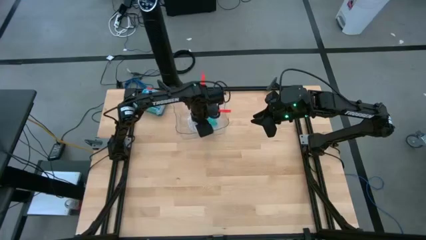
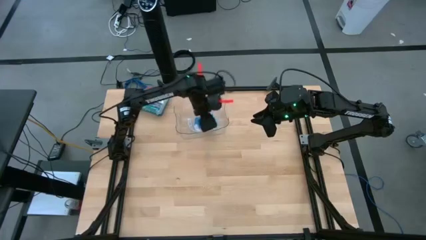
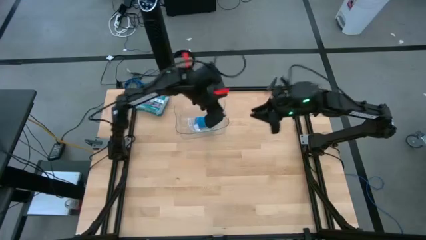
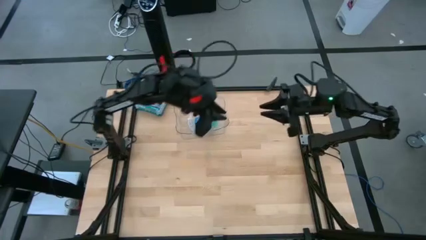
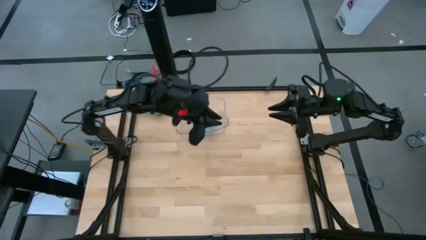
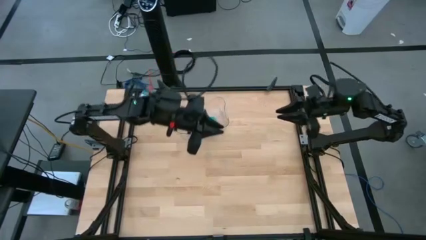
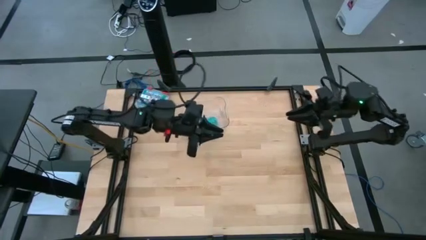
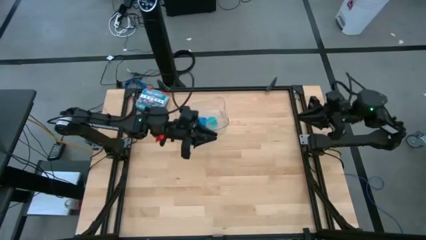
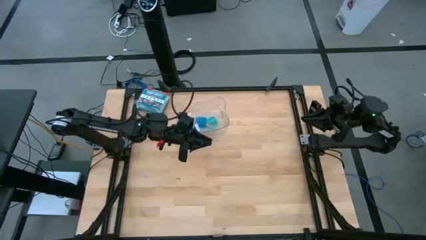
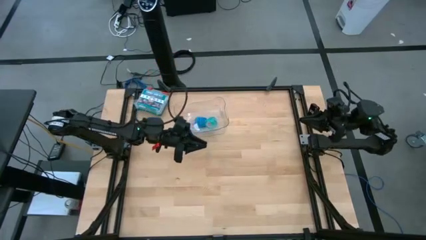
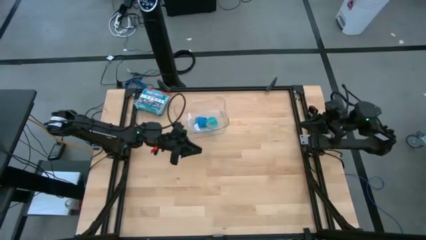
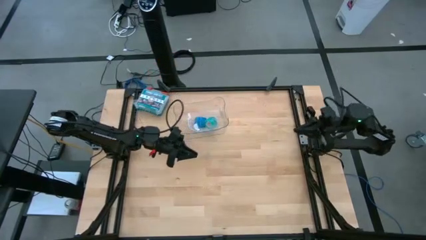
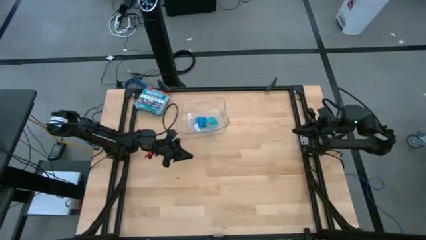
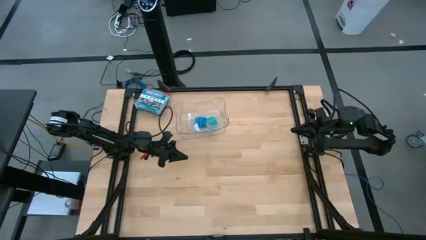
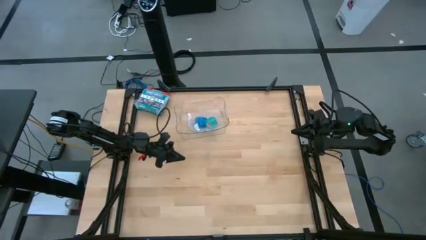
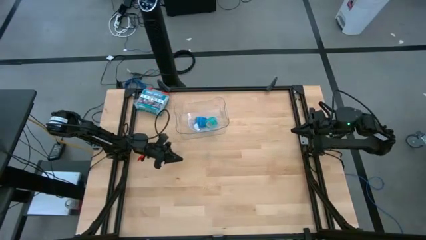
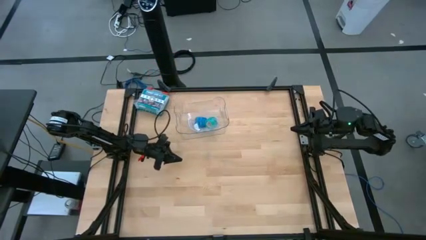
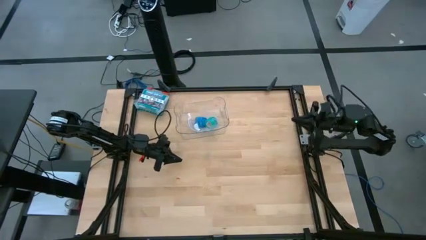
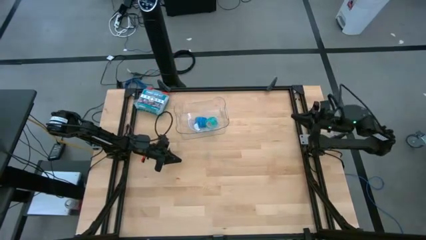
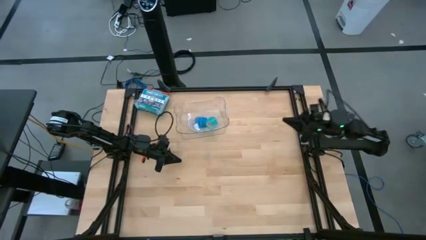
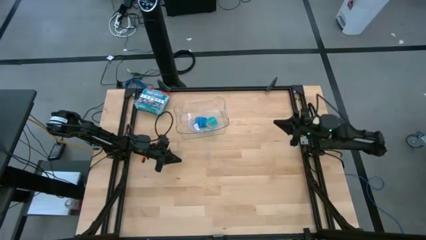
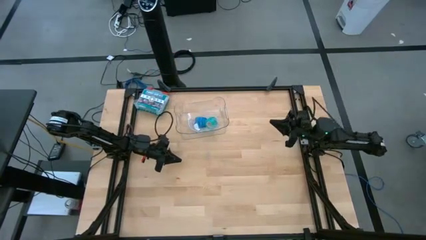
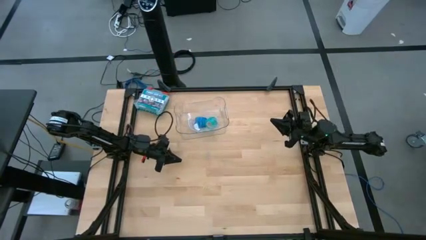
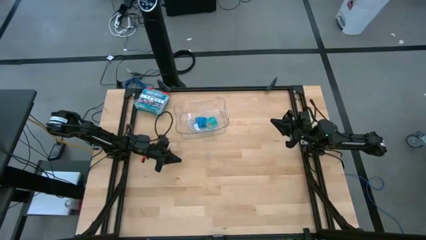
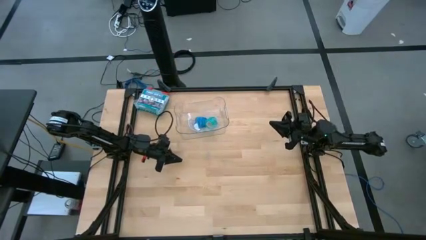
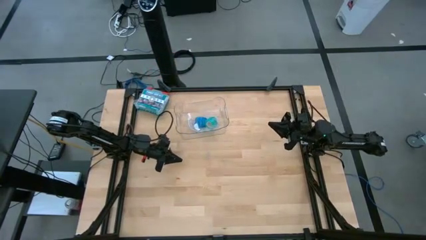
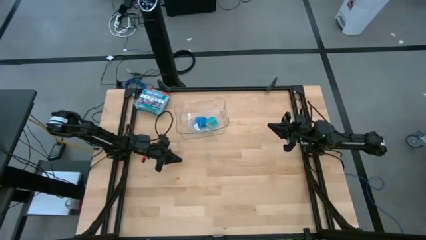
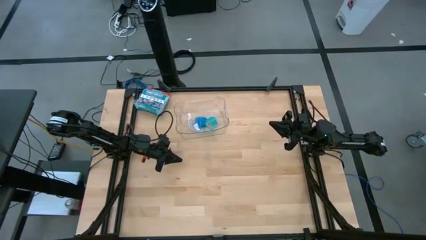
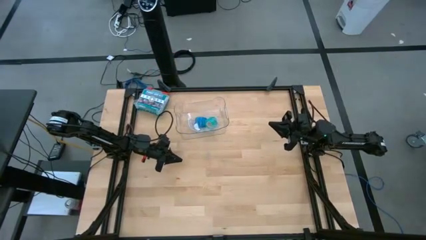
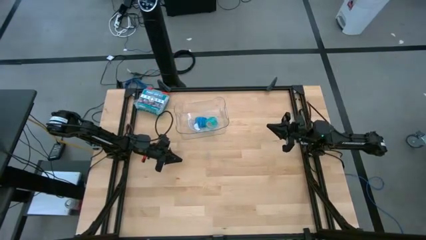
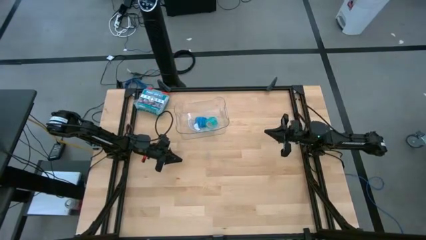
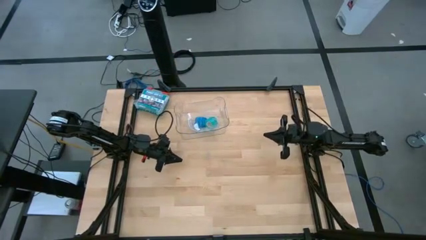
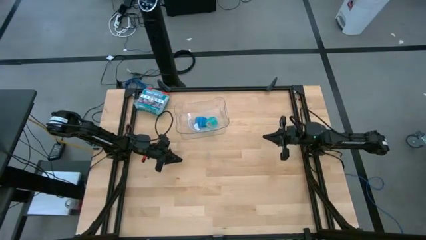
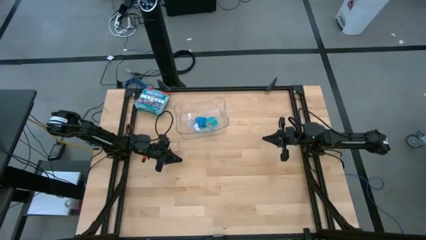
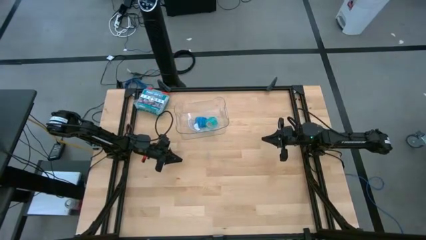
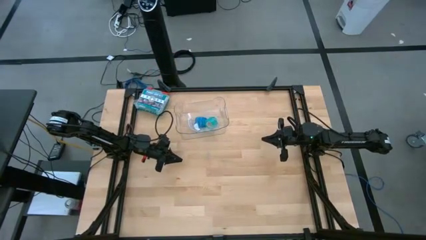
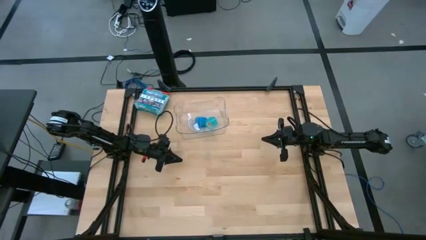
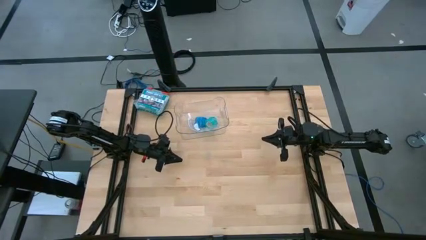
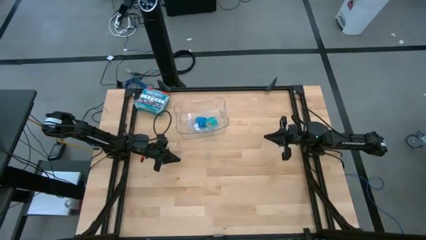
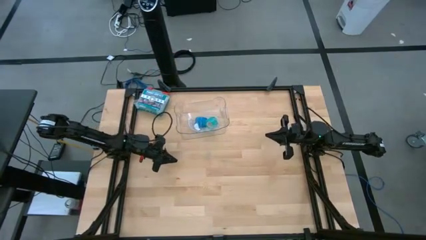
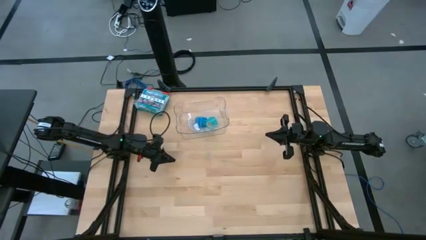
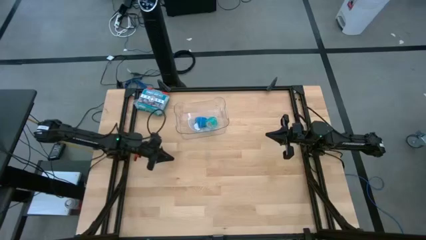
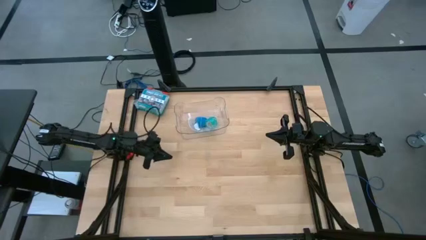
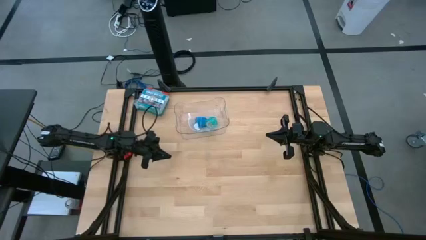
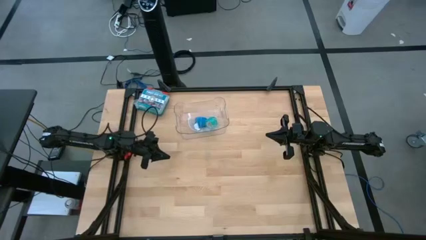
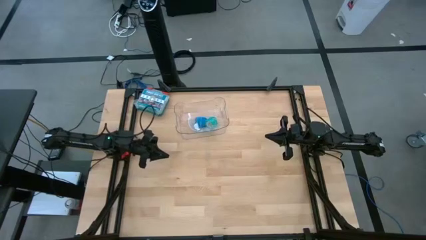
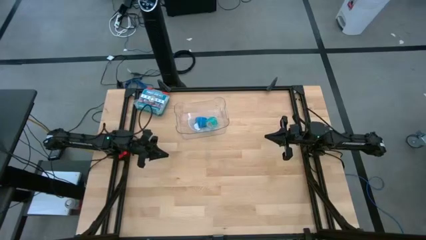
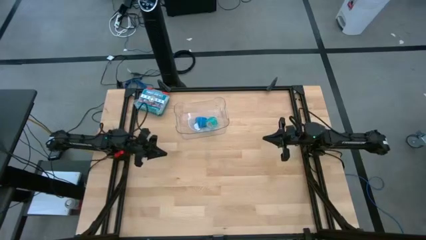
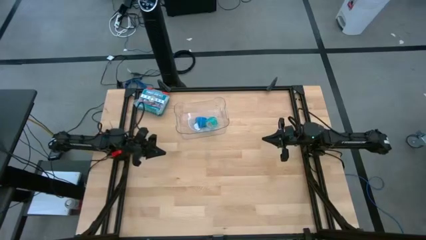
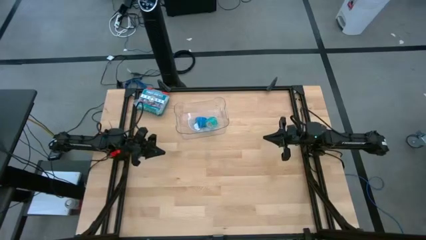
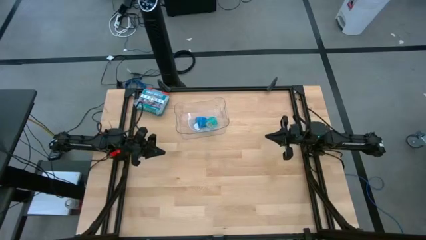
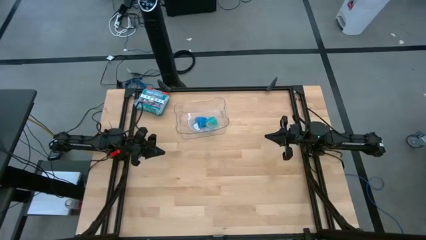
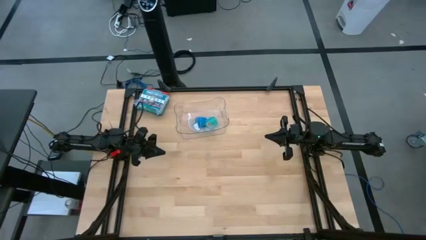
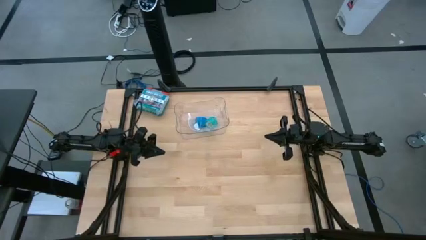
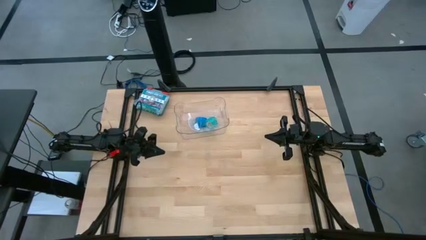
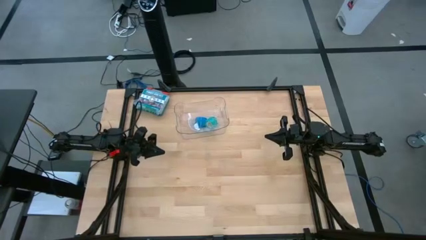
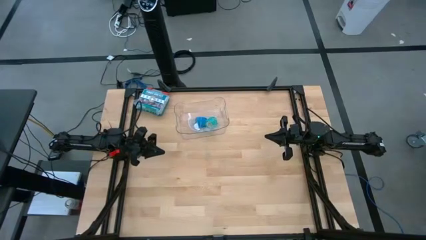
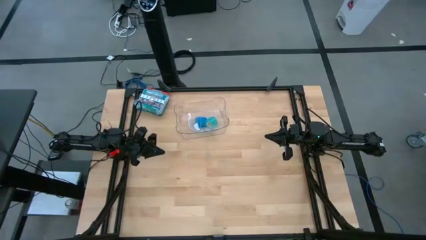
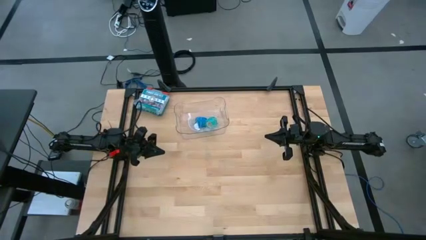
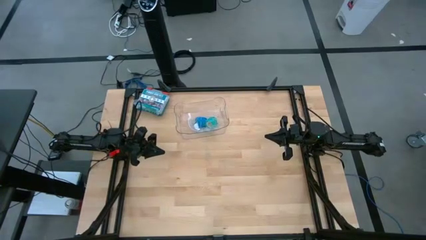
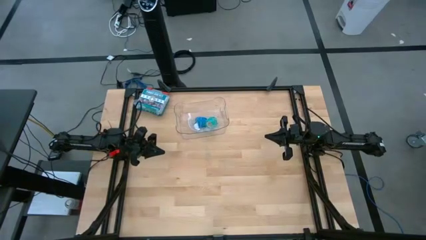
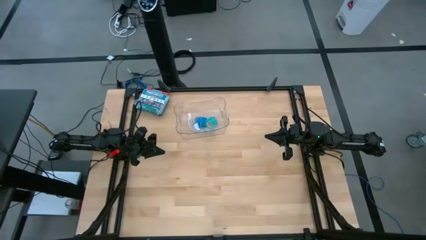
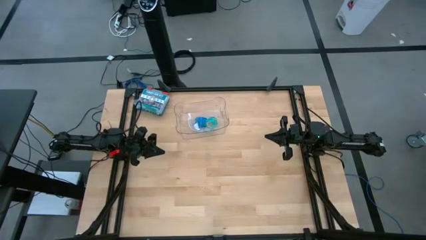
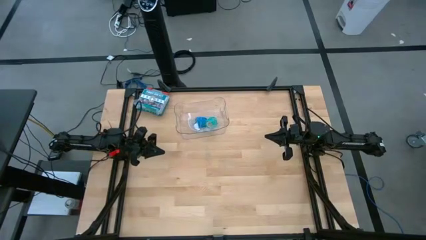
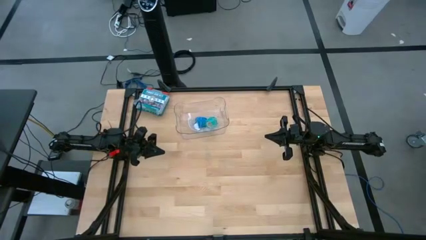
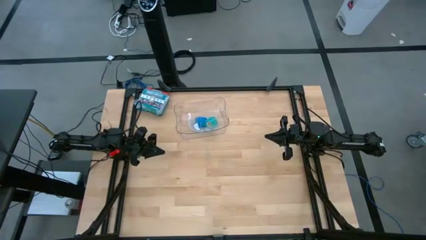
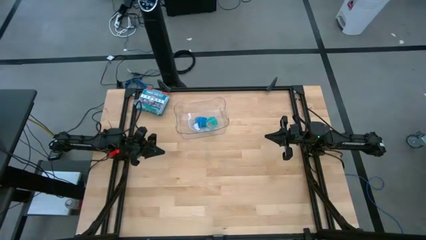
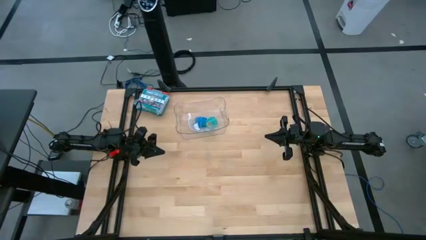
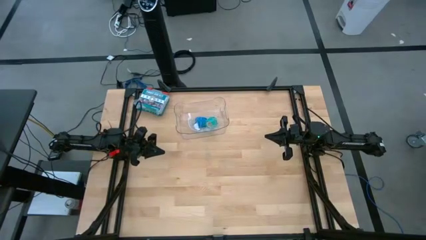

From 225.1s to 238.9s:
Task: Roll bandage
Return to Home Position

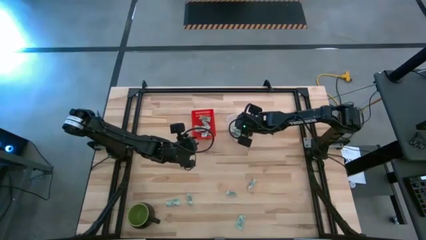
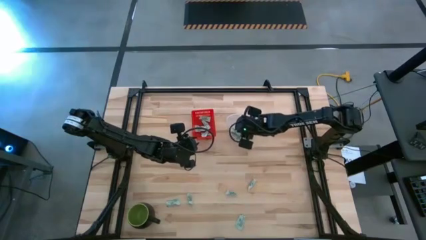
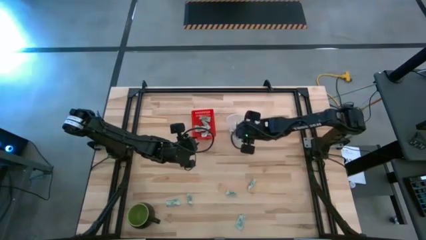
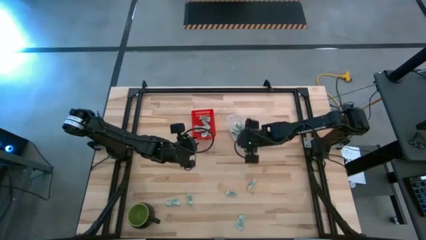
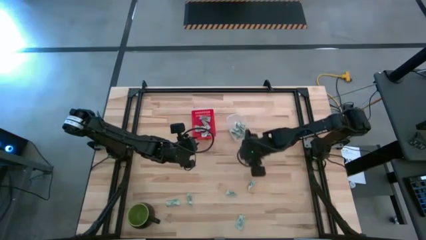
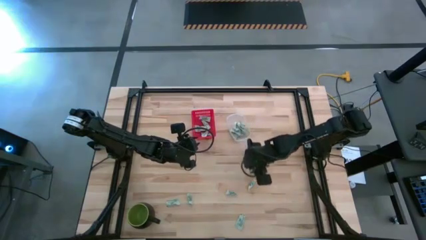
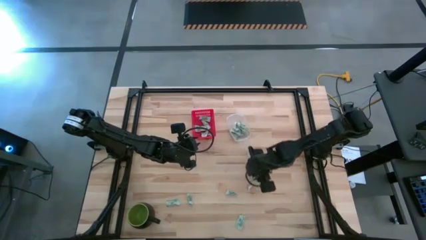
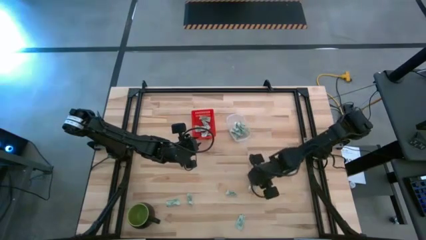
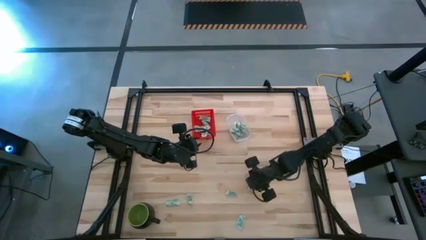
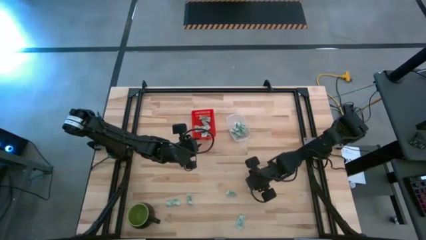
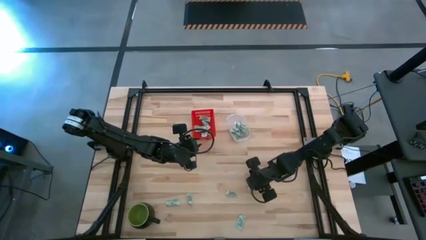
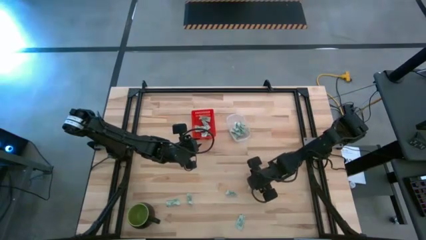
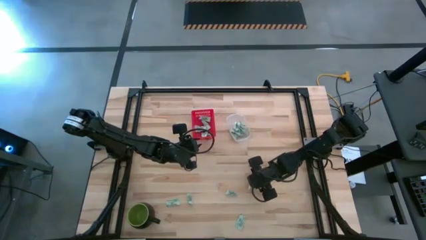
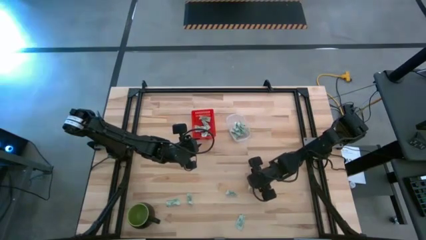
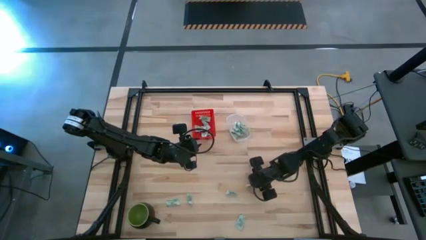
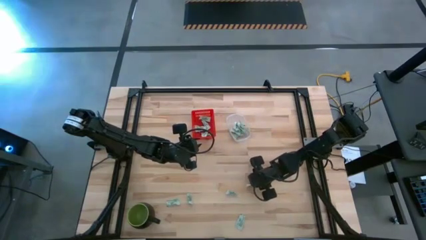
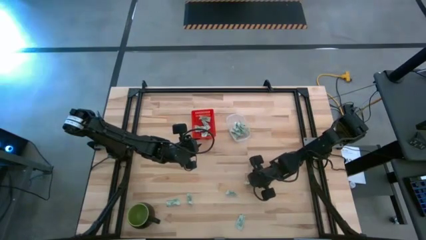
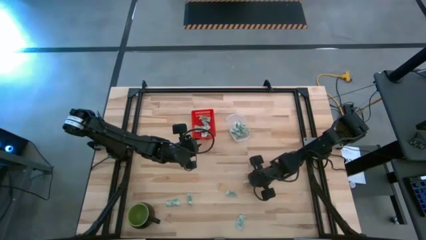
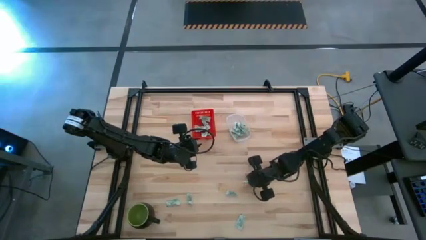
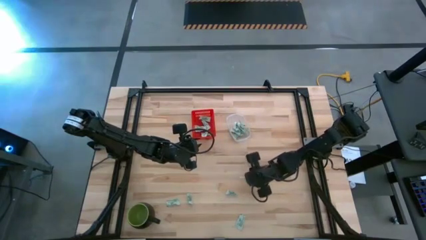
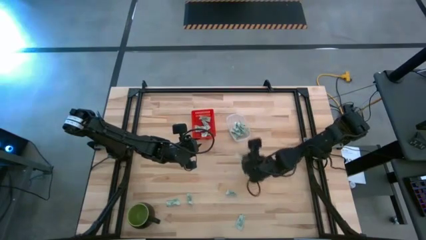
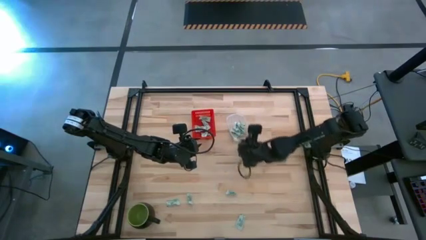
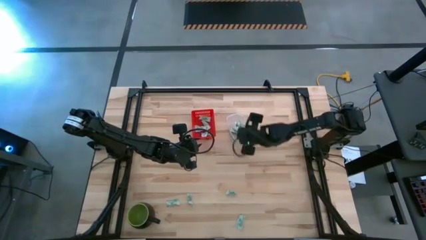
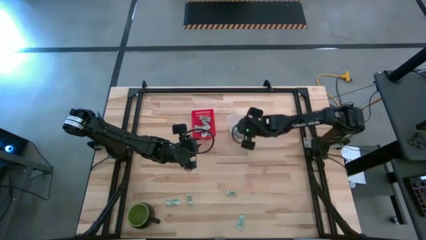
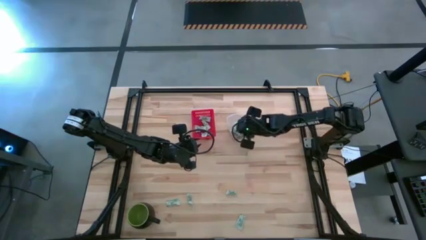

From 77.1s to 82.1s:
Task: Pick and place items into bin
Put the white stevia packet into the transparent bin
